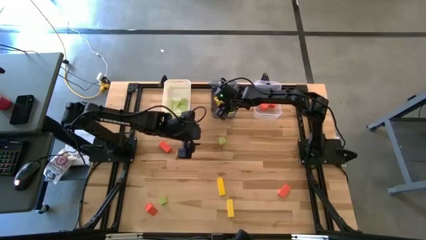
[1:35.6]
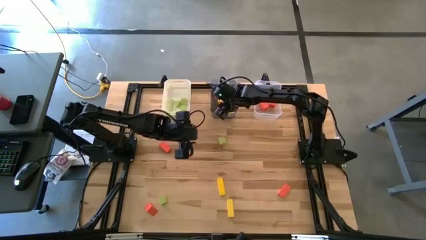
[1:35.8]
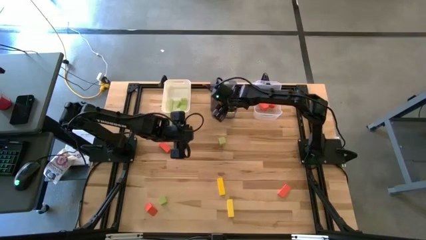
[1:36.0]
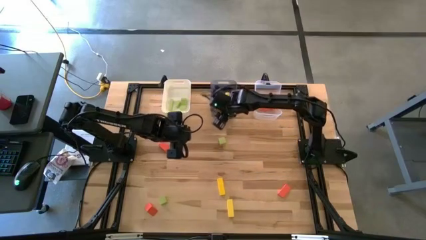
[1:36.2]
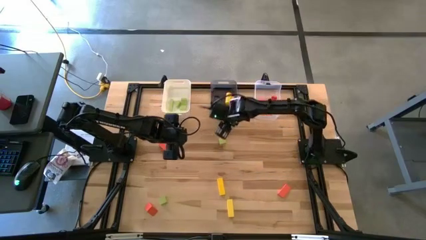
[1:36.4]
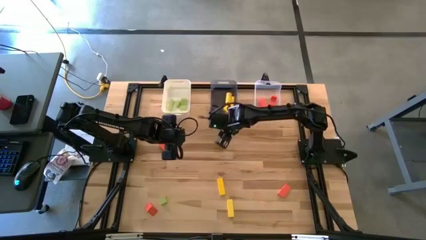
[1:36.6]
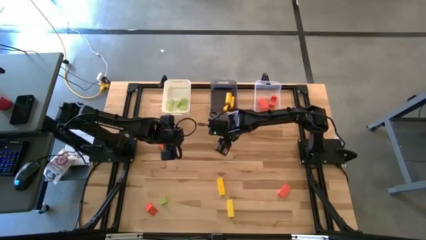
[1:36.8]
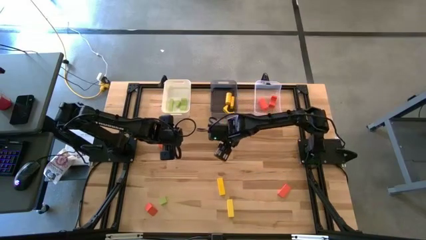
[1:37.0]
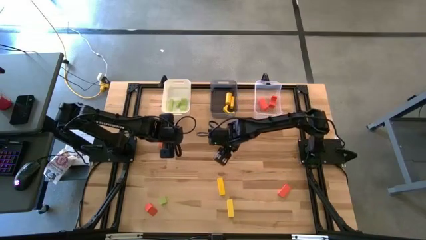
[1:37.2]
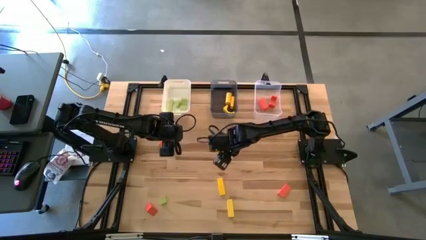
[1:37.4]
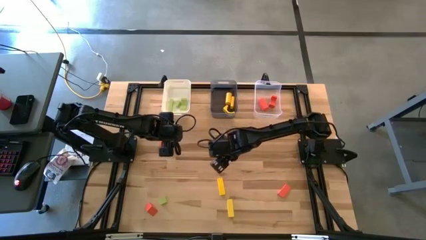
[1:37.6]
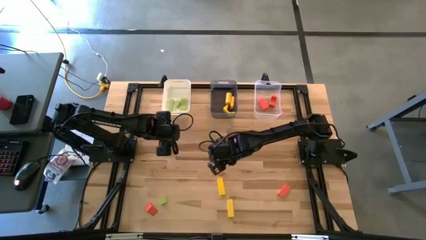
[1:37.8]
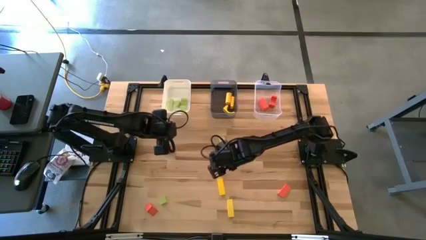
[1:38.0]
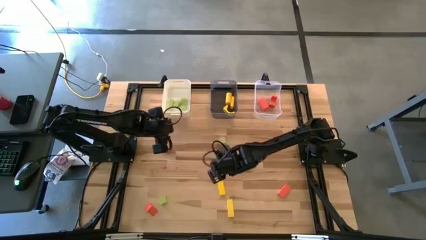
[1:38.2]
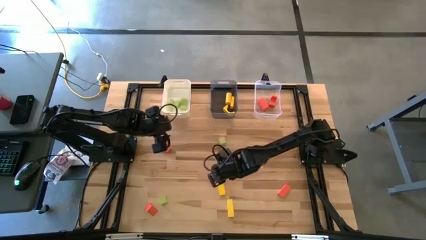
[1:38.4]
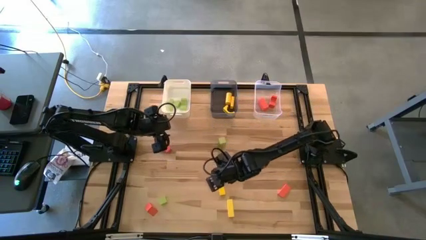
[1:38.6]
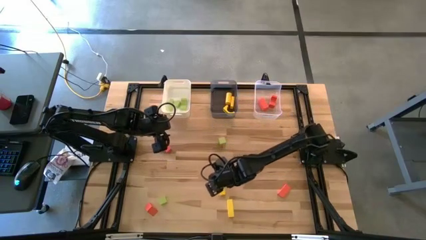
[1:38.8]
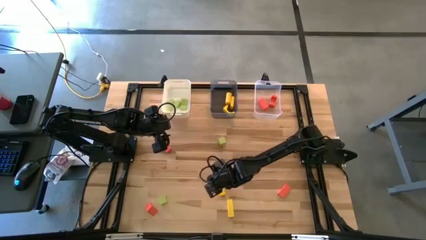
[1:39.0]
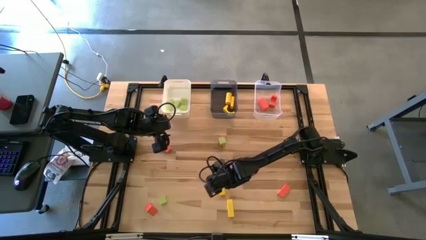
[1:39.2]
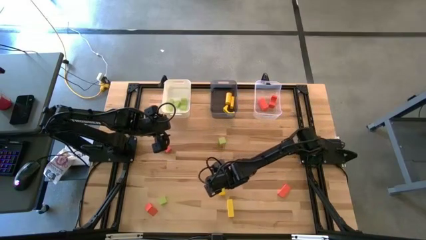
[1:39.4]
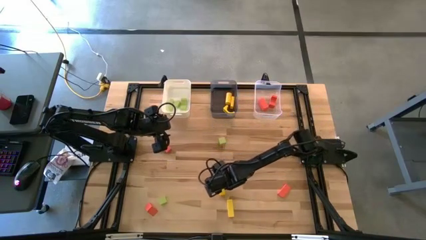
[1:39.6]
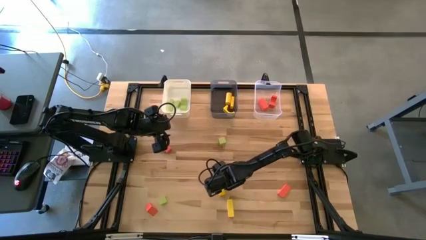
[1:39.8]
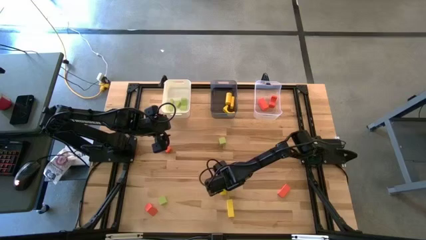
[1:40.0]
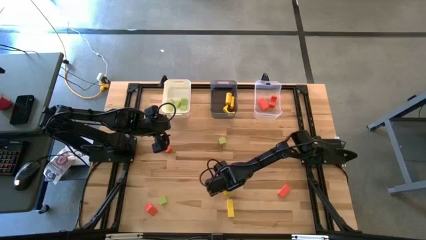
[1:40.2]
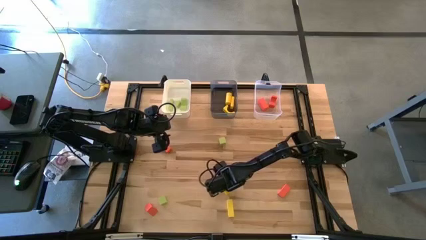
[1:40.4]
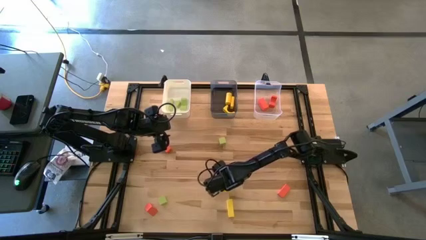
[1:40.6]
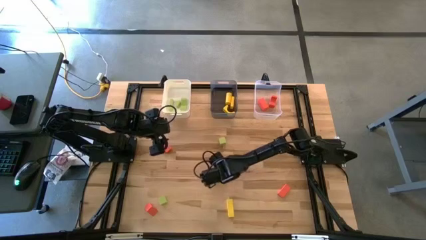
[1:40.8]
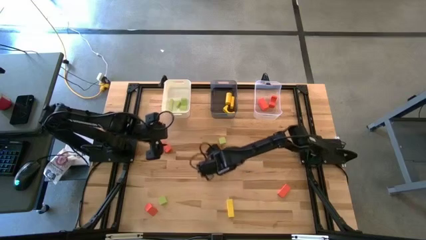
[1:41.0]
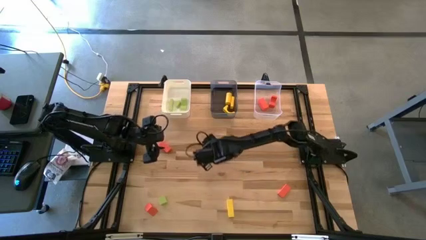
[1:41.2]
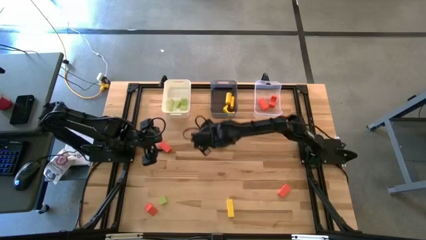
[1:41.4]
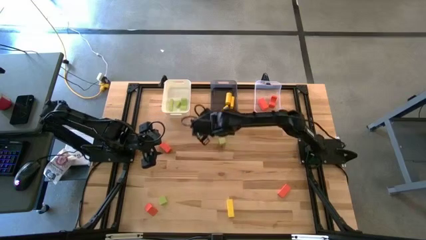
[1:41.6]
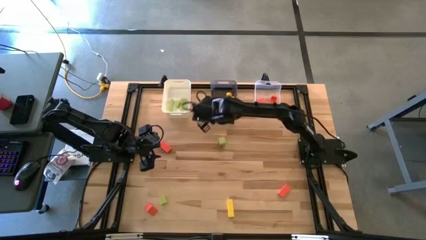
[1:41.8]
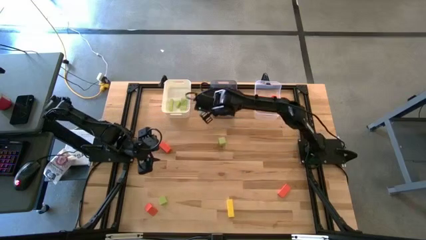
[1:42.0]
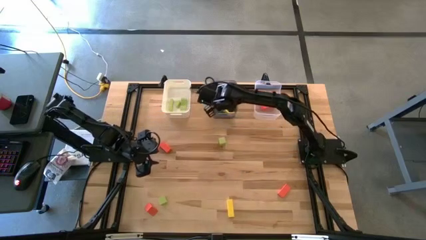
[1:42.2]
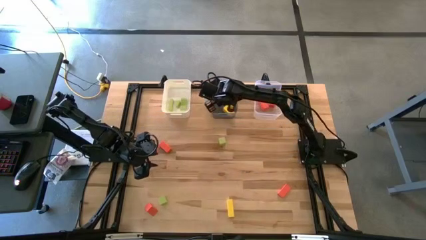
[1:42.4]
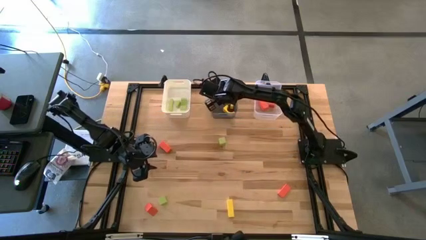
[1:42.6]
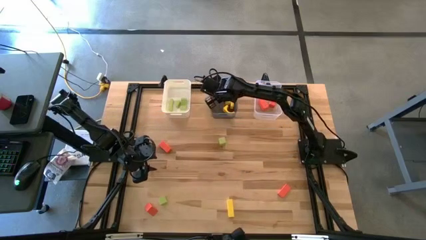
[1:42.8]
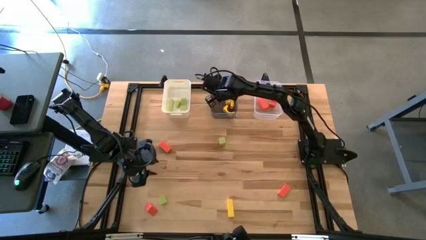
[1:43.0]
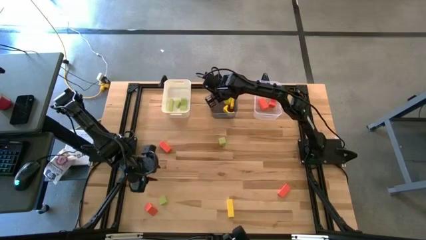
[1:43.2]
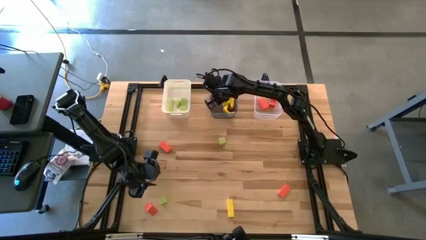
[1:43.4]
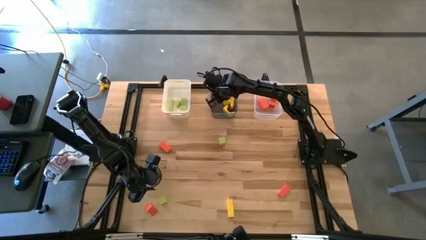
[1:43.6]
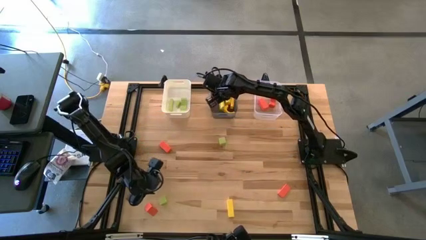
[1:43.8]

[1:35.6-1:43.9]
Task: Sort & place blocks by color
Put the yellow block into the black bin

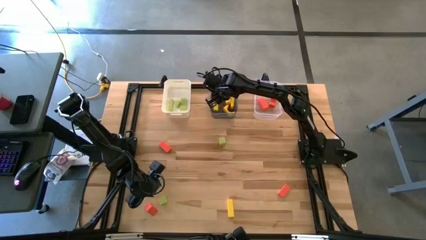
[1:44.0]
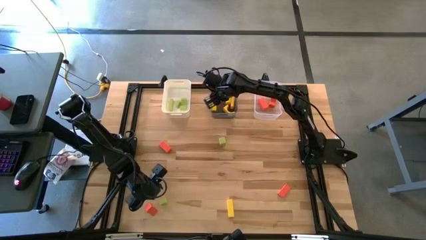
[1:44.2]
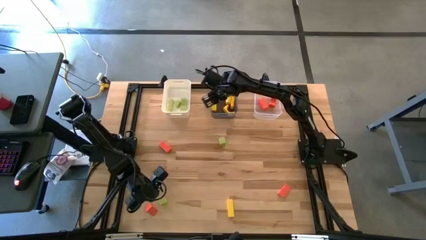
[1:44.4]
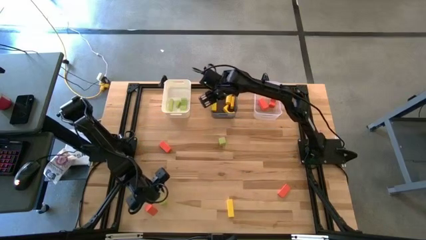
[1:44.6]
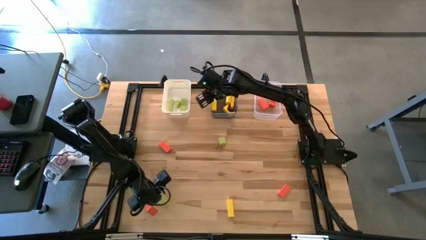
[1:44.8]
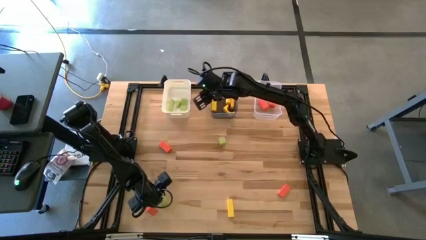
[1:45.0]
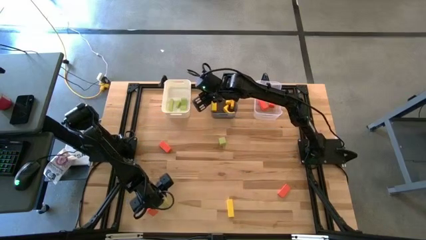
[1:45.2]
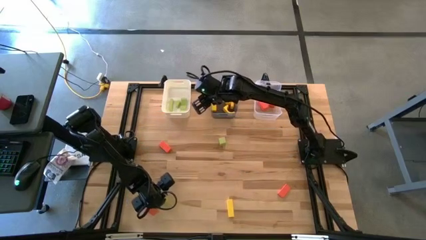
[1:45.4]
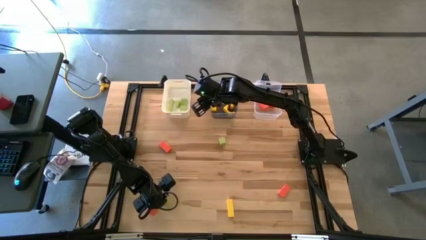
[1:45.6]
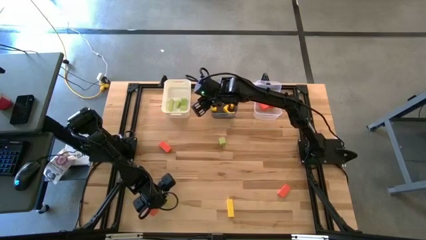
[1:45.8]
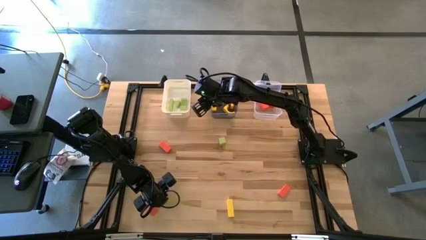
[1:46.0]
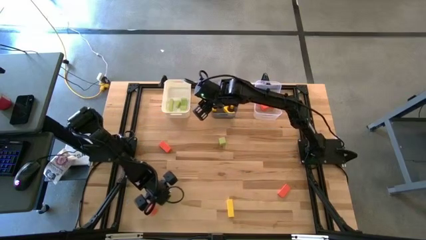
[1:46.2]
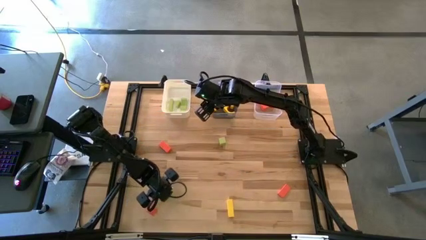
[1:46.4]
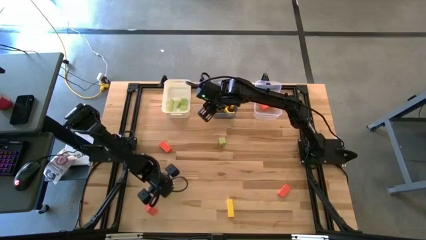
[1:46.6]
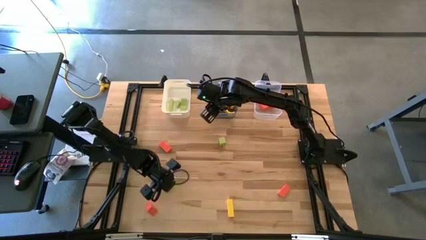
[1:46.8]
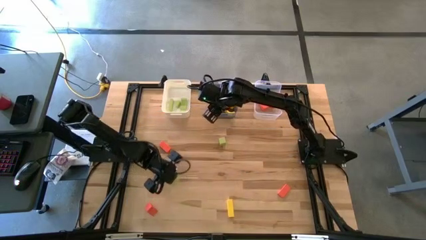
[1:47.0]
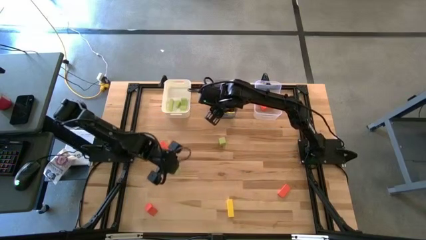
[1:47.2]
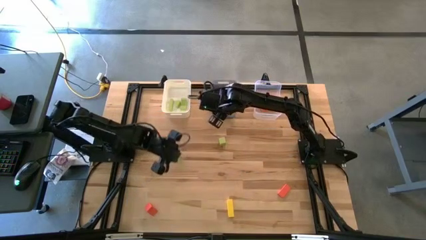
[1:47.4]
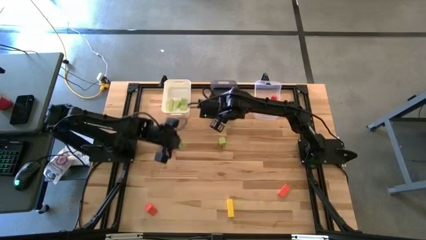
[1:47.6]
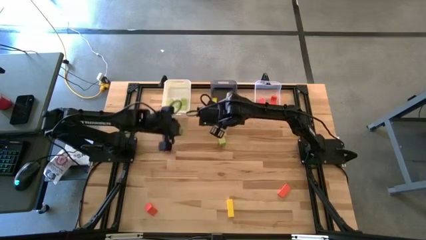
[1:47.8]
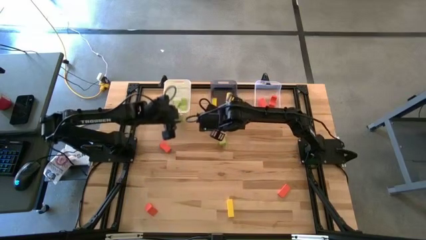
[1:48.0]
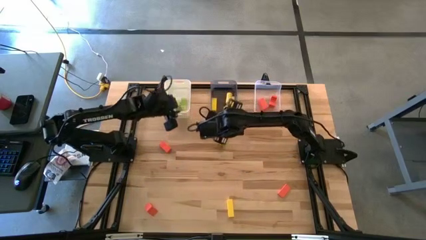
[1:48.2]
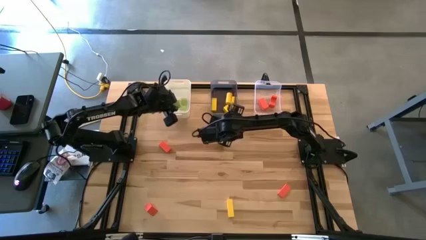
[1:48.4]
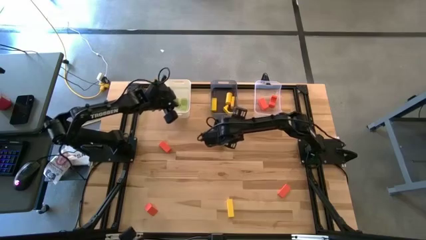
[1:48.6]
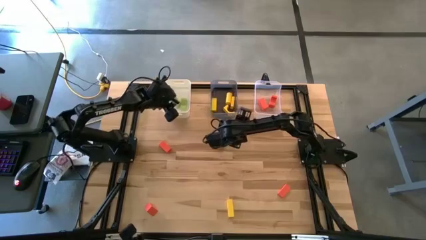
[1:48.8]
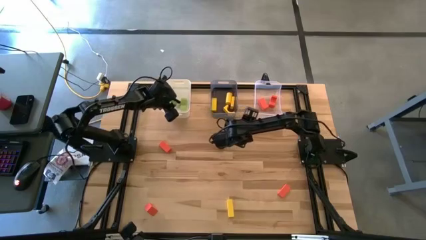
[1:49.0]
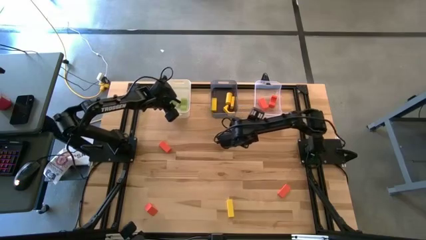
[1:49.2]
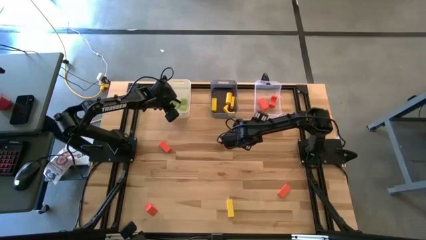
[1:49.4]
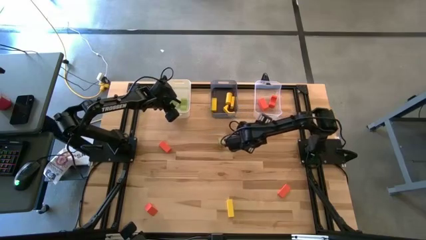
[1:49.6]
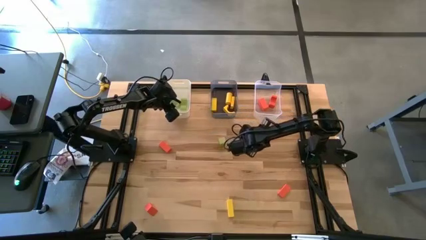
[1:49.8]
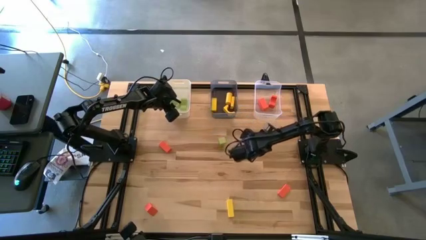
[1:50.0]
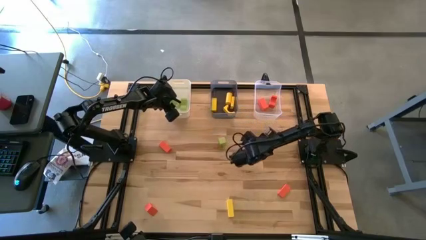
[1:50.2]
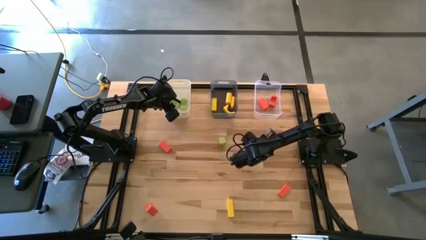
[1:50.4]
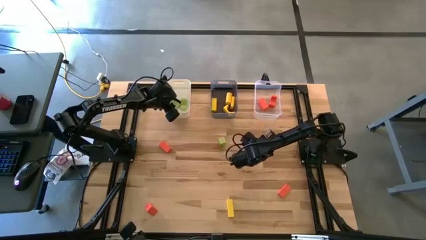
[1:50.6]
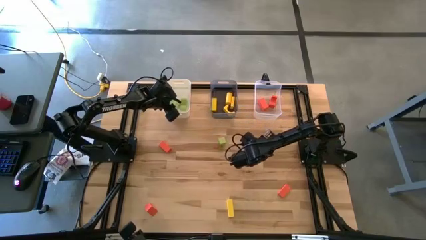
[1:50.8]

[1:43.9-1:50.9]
Put the green block into the white bin

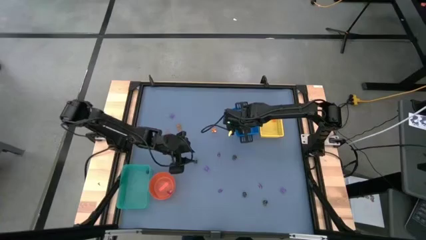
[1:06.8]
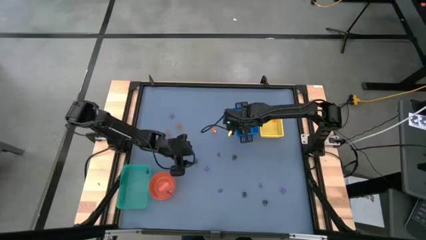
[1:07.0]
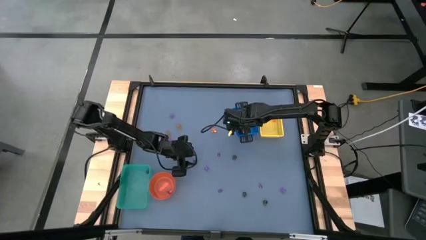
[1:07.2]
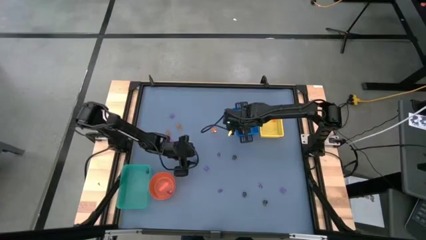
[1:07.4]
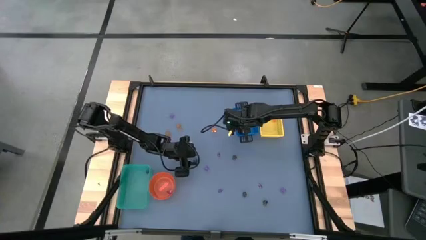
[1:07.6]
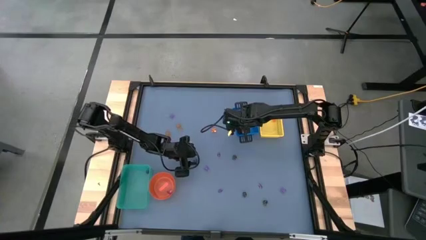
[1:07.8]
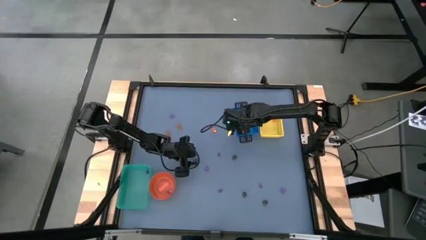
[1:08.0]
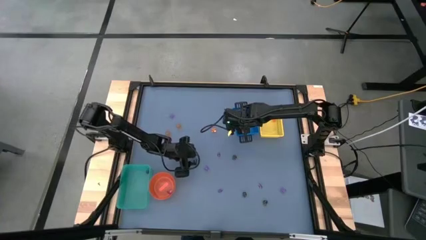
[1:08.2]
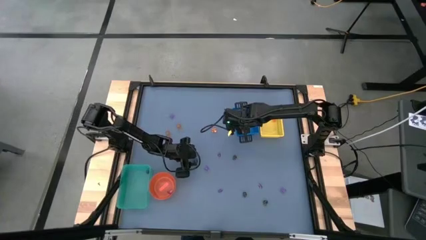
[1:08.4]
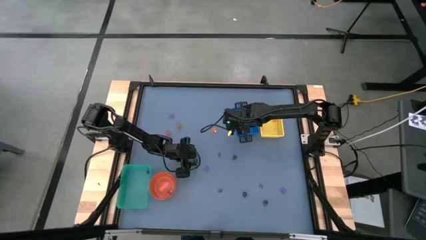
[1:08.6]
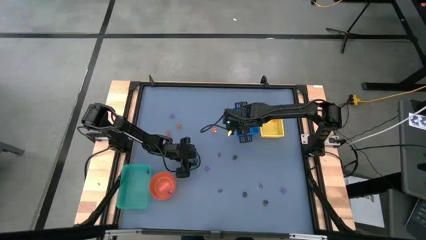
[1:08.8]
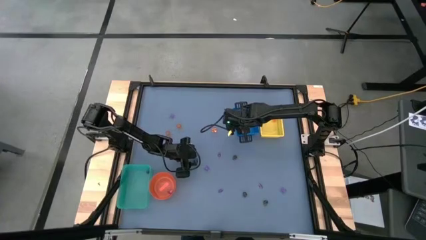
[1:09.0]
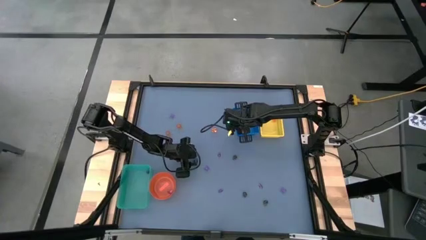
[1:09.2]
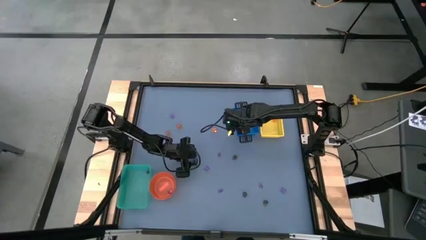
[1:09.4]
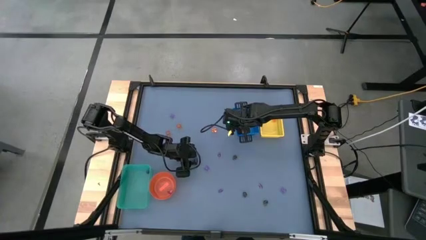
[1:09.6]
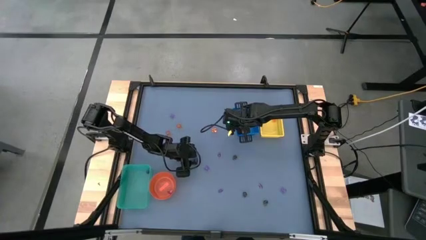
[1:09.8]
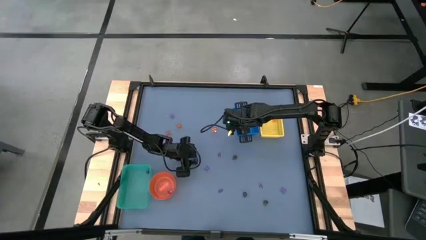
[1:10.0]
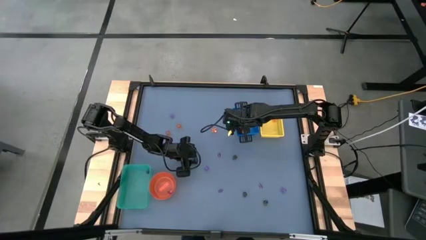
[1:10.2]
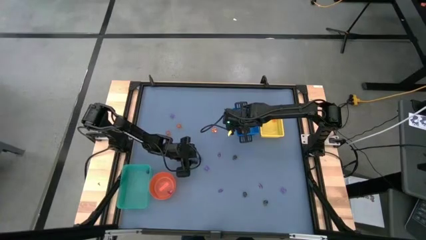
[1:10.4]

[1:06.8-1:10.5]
Task: Sort Halloween decoration
Put the brown skull toy into the green bin
